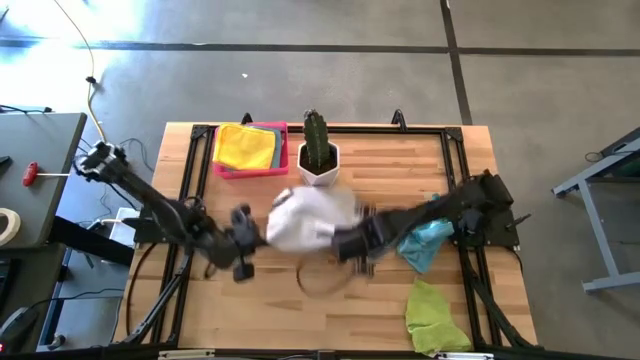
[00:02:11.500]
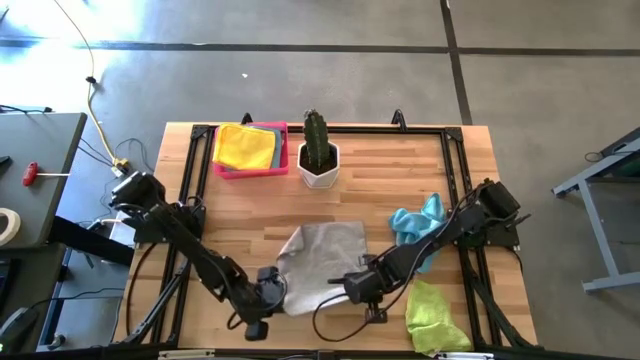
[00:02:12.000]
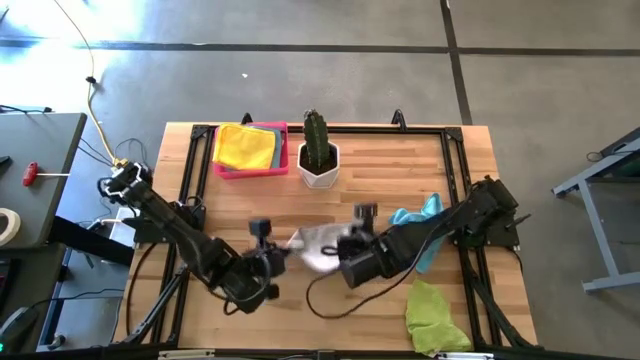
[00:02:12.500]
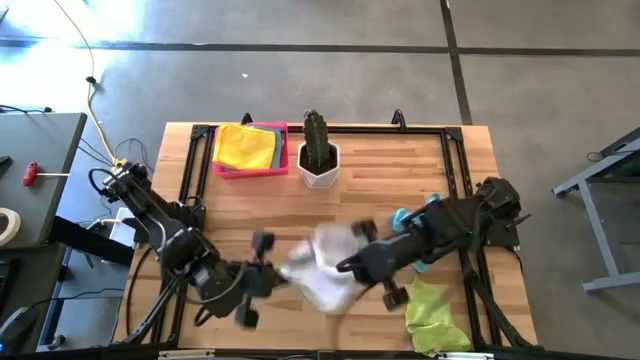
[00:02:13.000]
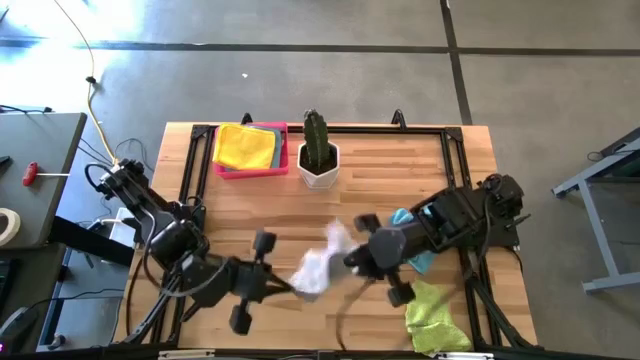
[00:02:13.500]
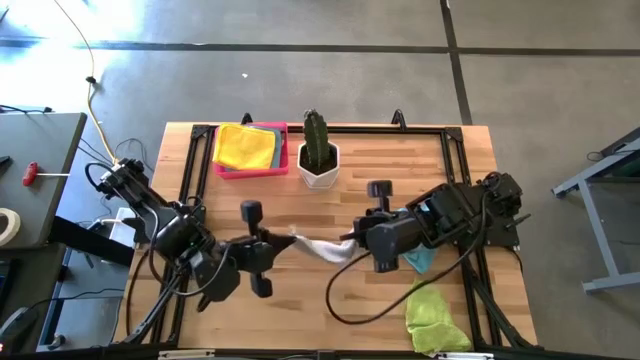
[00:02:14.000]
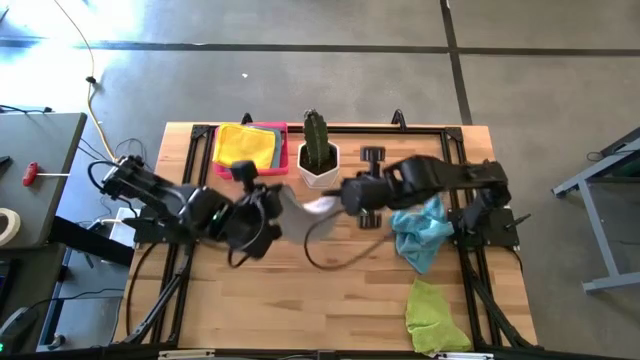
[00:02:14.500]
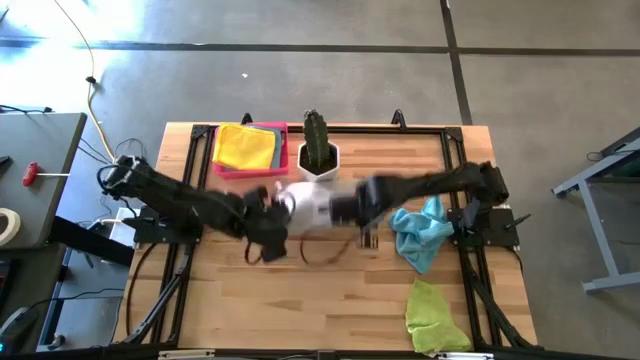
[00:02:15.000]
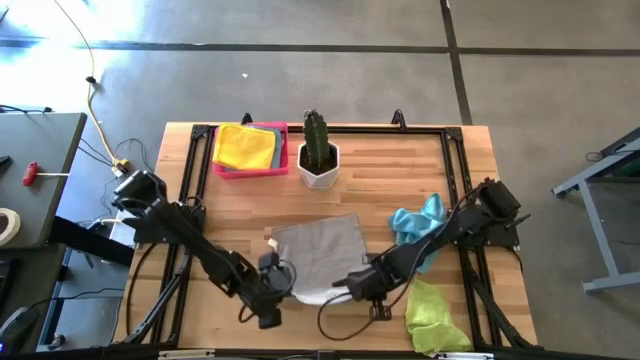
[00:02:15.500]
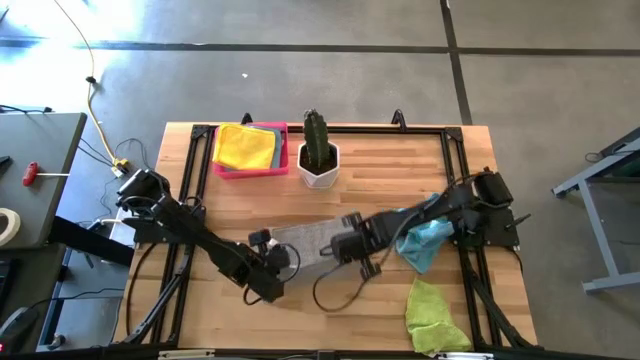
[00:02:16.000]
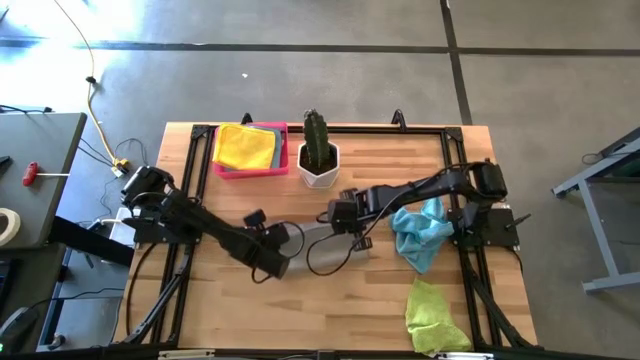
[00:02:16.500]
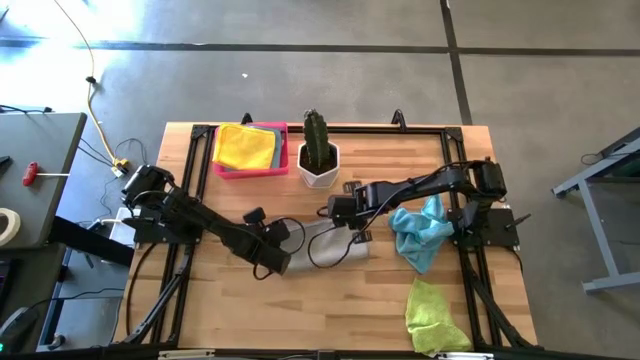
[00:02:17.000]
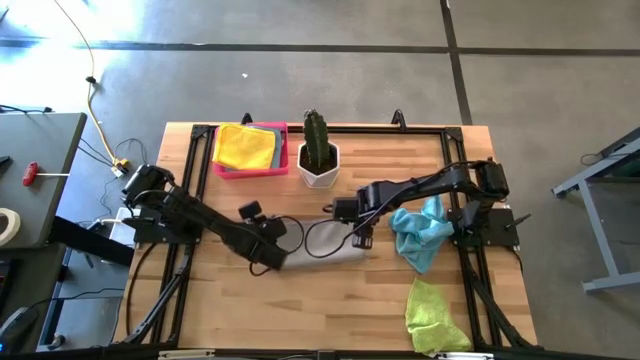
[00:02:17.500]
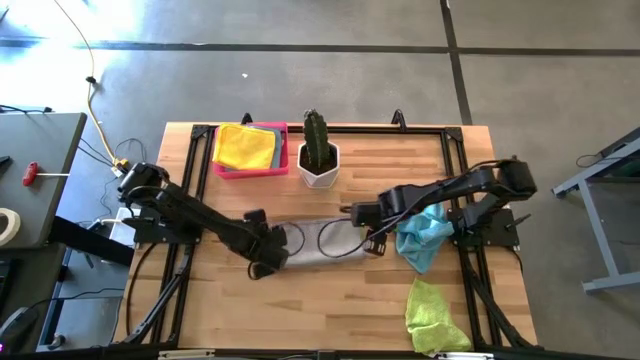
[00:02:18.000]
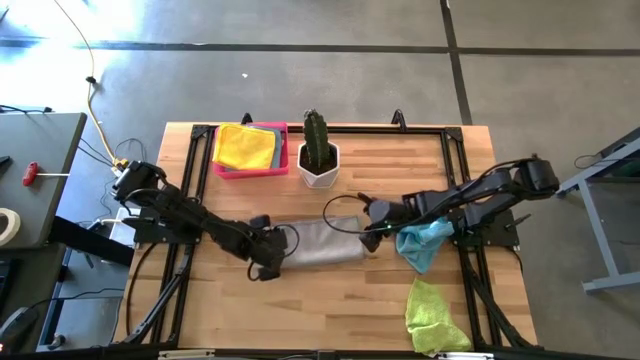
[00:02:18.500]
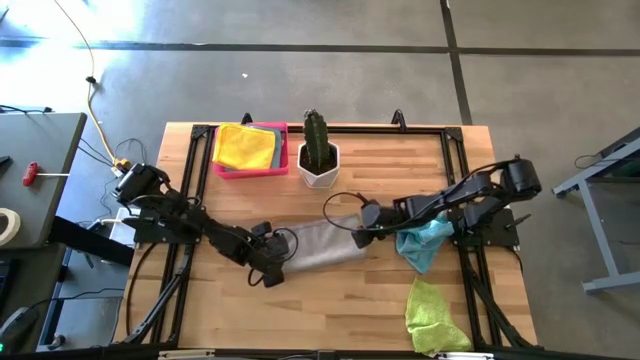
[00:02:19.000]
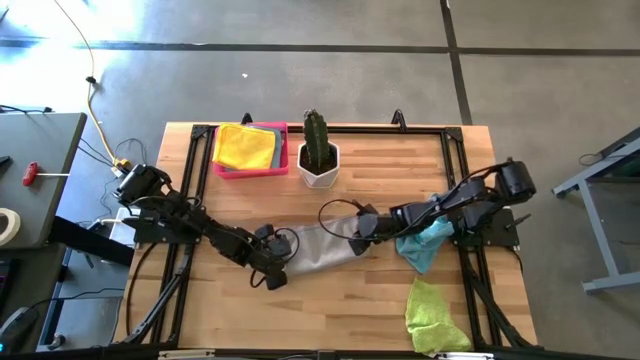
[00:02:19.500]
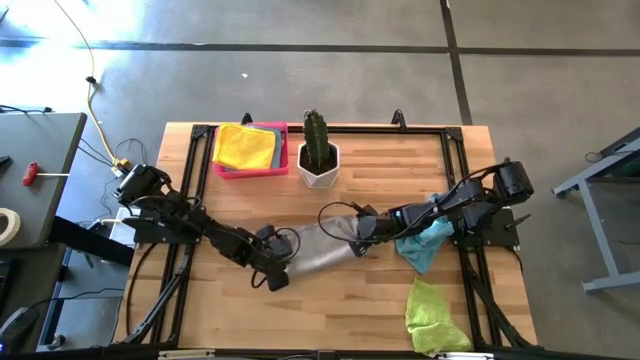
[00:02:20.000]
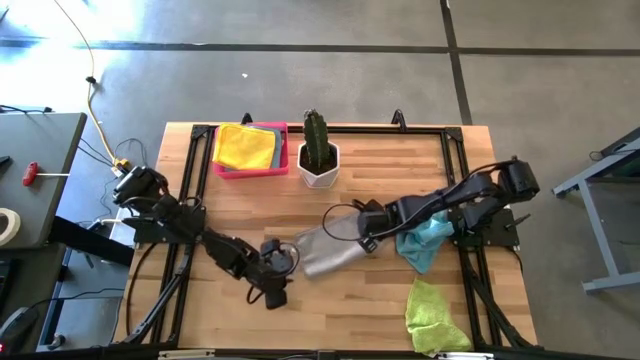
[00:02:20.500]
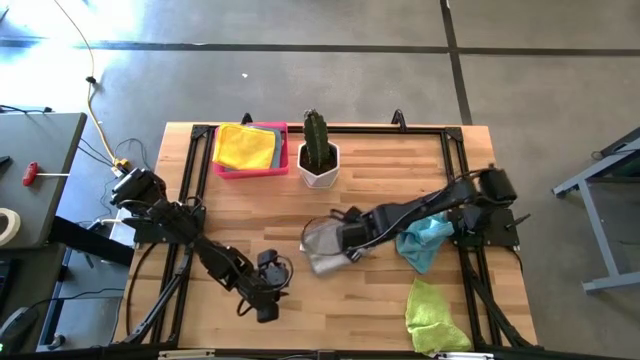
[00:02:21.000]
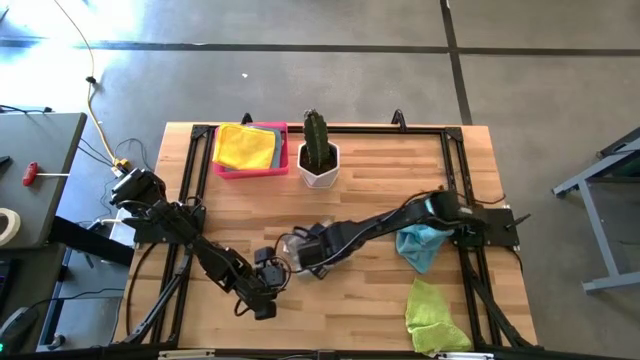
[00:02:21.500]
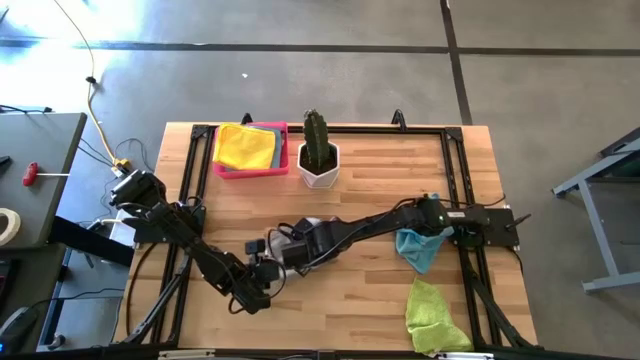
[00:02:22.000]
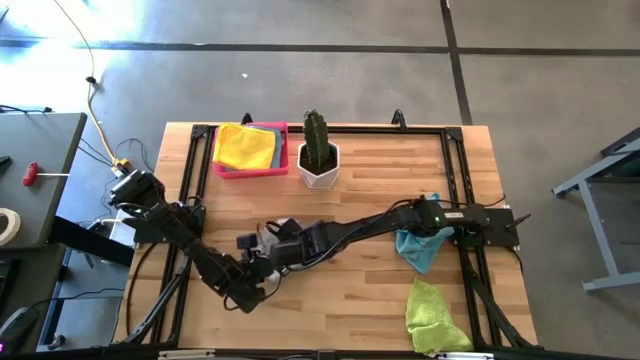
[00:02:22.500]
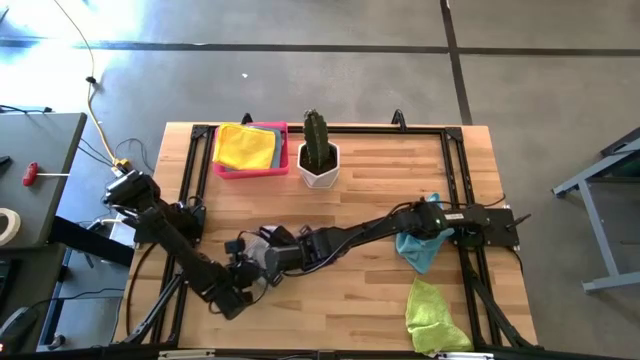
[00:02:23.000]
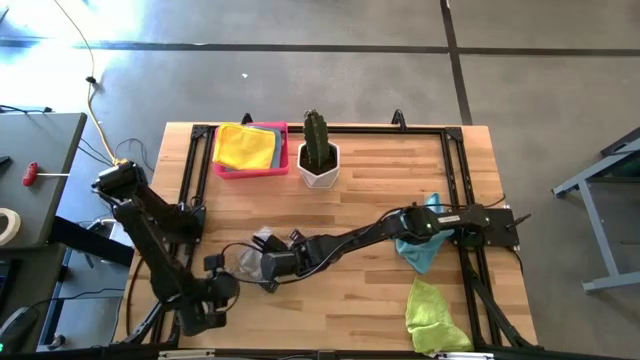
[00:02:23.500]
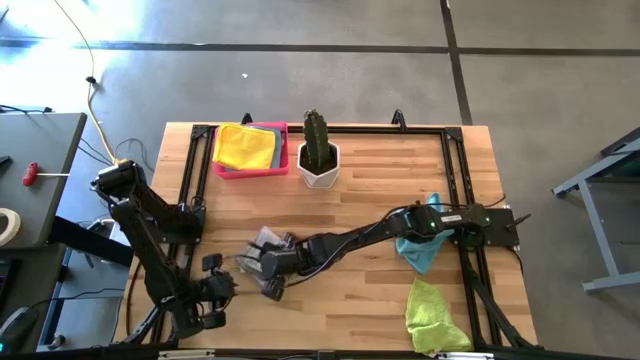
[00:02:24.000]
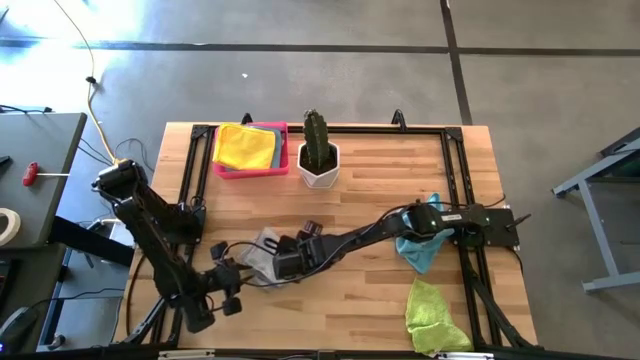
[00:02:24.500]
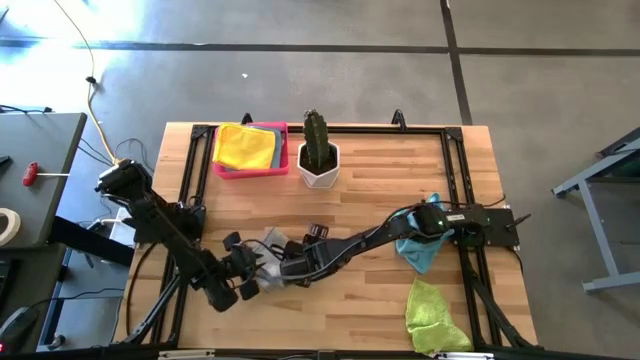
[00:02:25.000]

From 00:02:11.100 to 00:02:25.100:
Task: Fold microfiber towels
Fold the gray microfiber towel

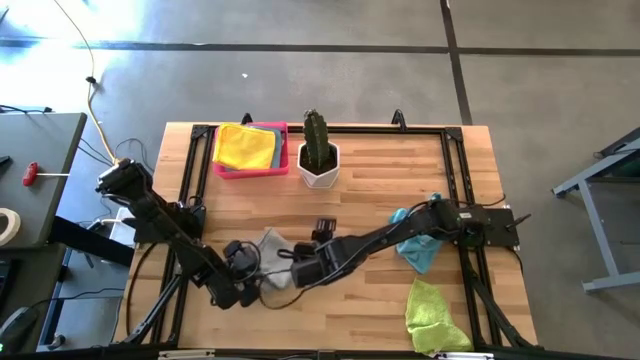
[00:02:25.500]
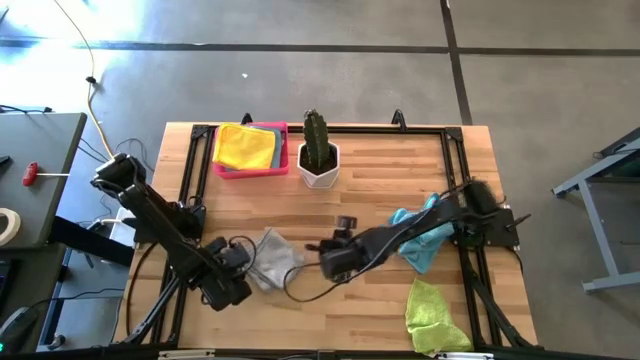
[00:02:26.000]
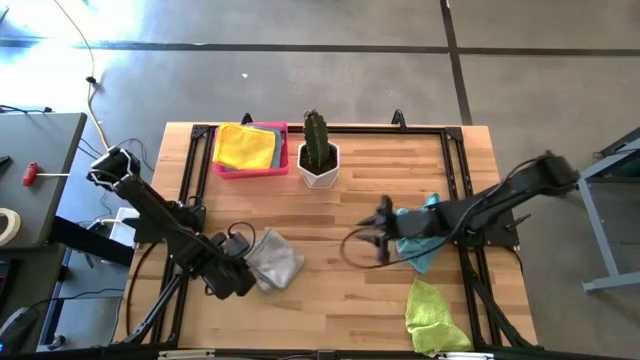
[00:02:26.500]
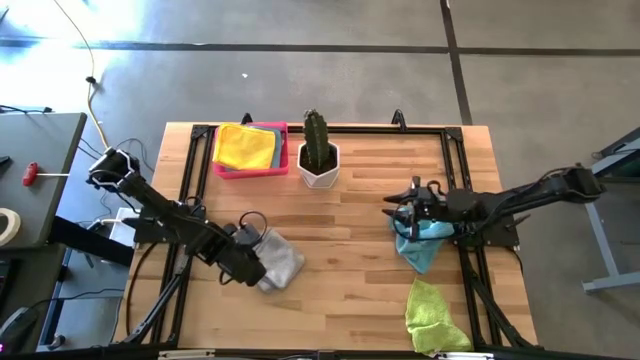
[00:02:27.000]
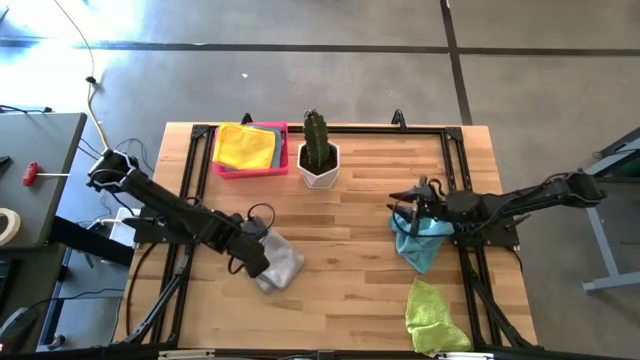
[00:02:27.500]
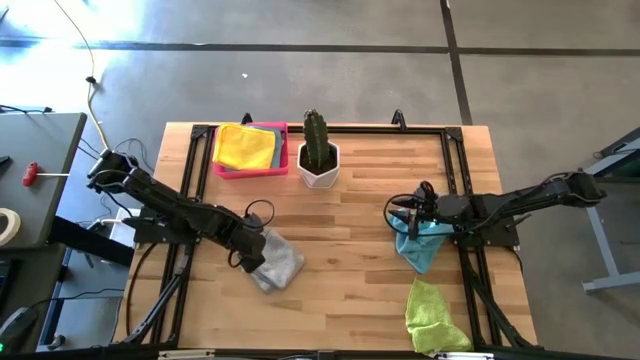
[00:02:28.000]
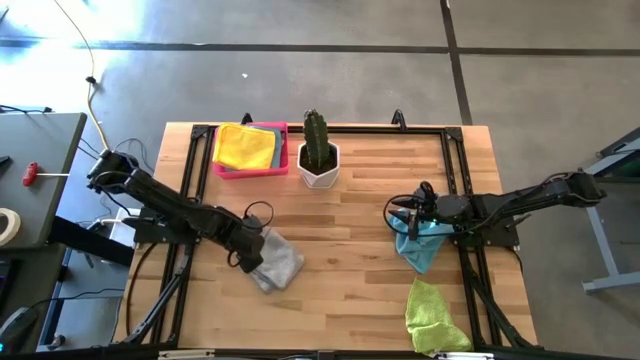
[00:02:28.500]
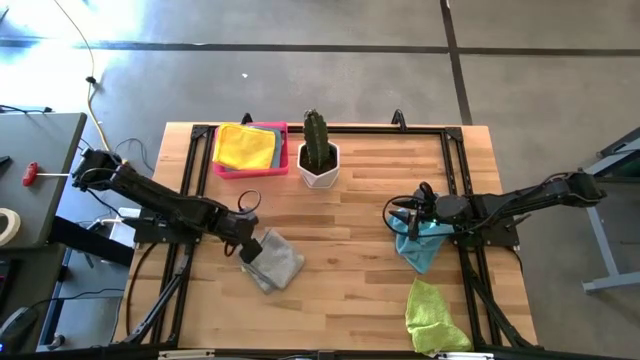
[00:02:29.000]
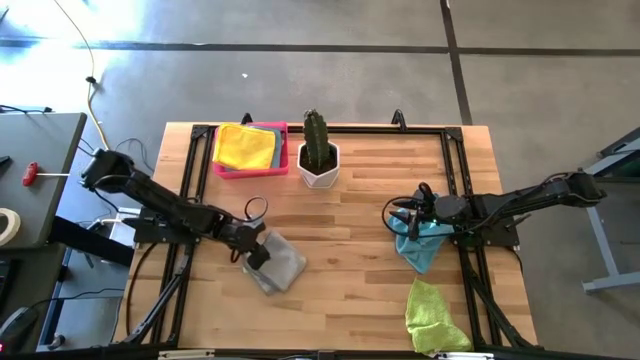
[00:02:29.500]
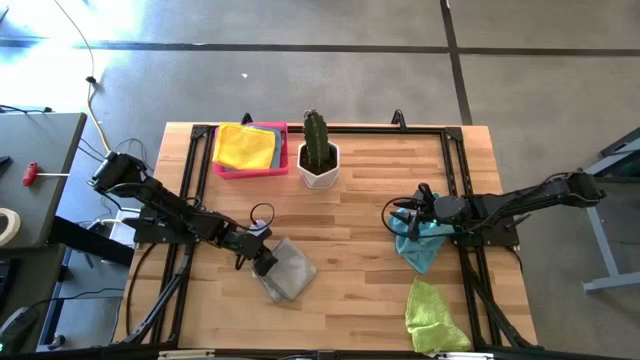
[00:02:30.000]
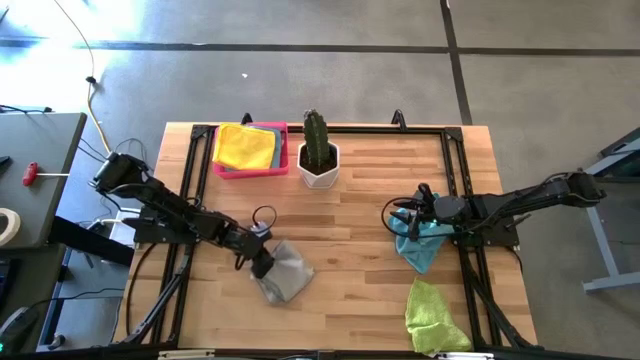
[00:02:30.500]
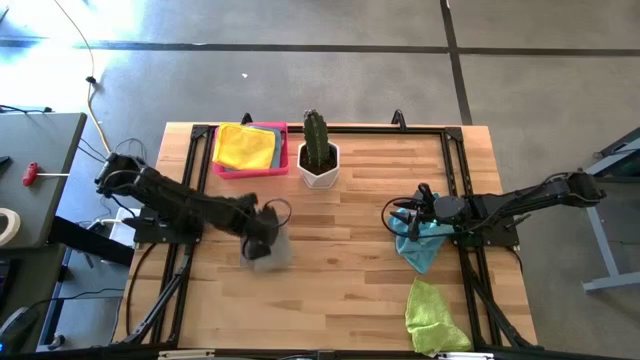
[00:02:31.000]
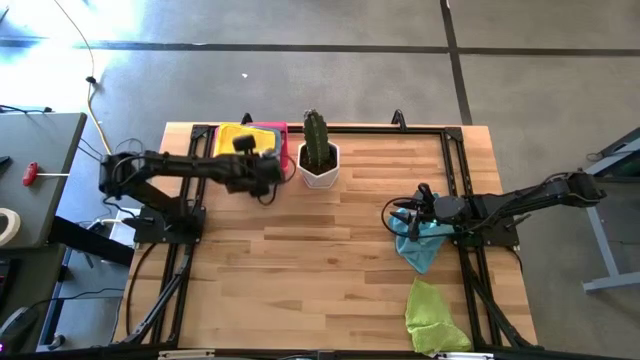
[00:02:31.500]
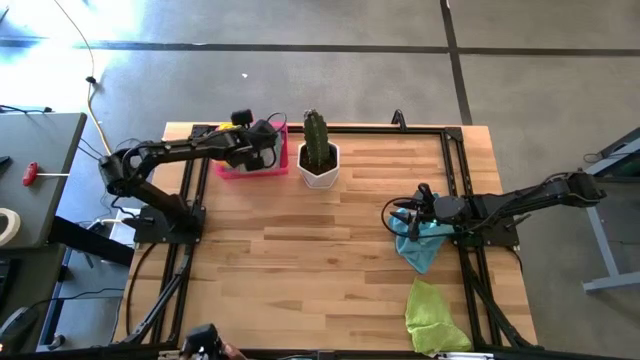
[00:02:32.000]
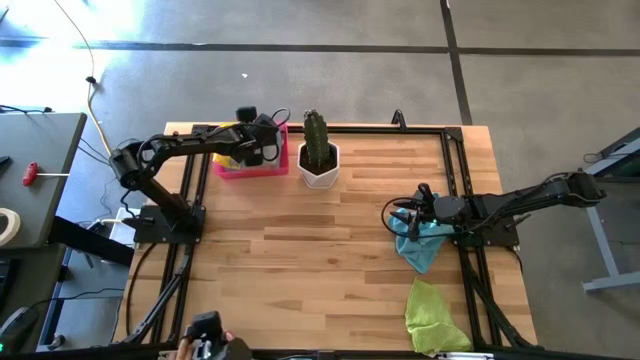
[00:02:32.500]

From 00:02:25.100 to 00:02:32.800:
Put the folded gray microfiber towel on the pink bin
